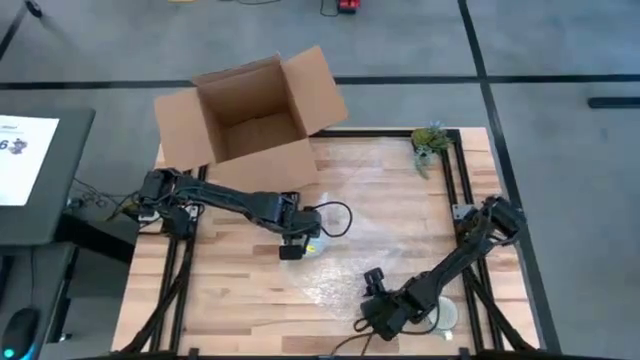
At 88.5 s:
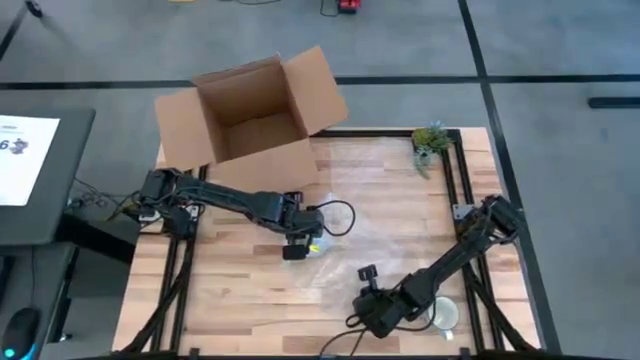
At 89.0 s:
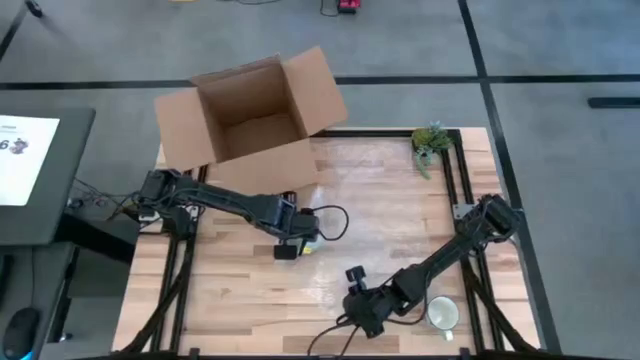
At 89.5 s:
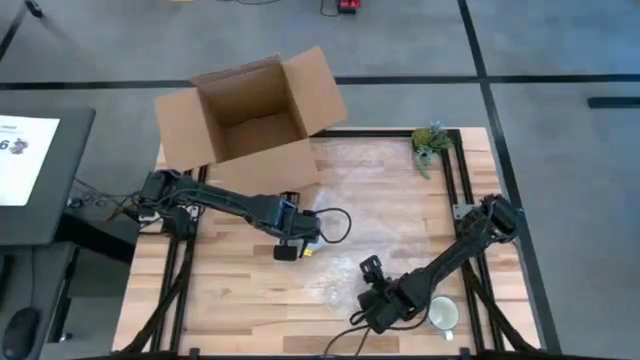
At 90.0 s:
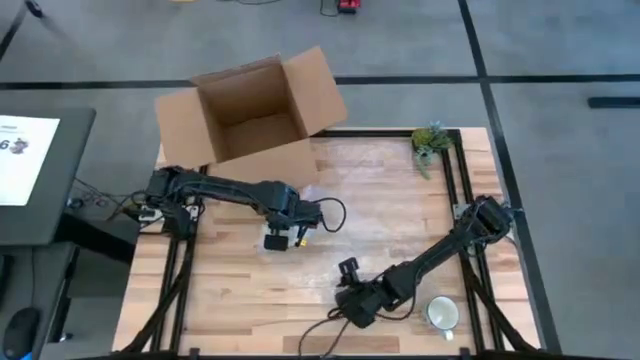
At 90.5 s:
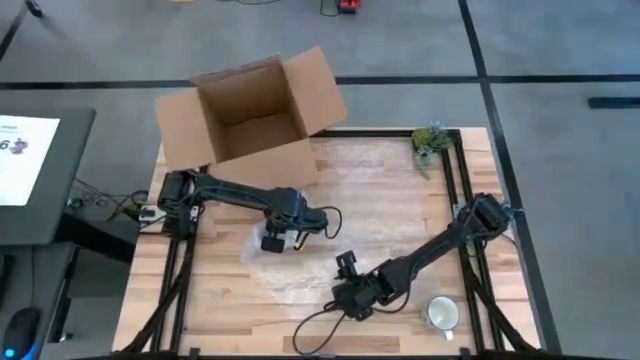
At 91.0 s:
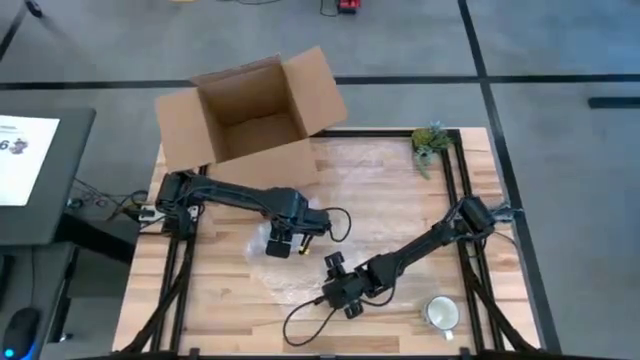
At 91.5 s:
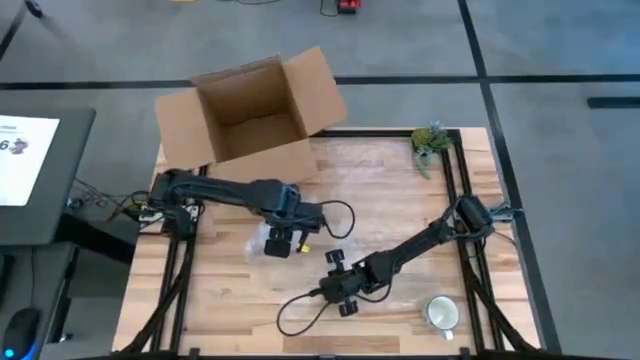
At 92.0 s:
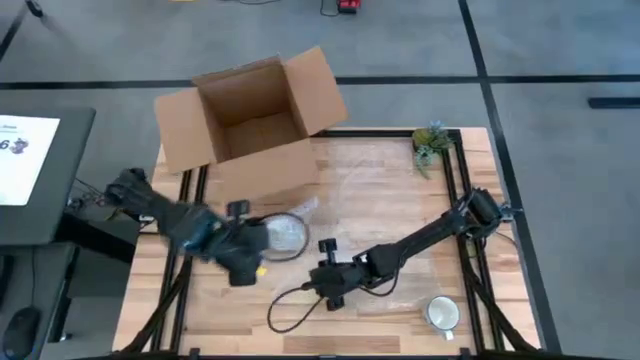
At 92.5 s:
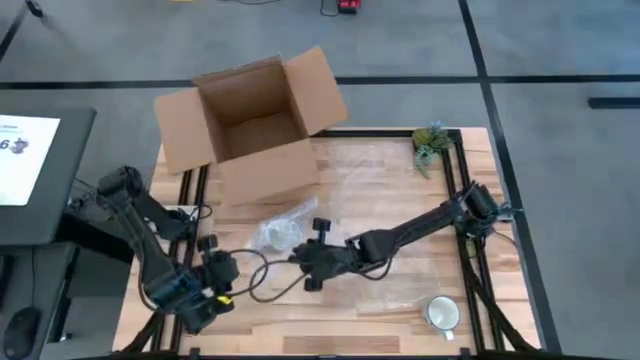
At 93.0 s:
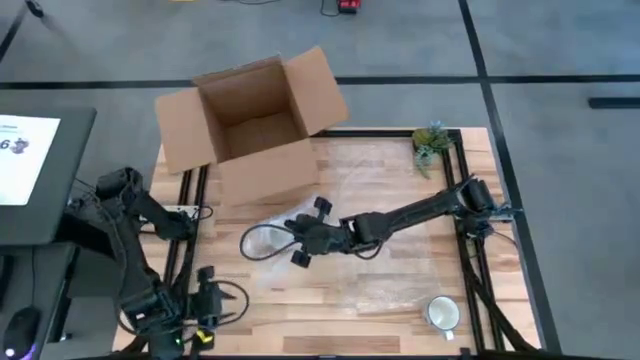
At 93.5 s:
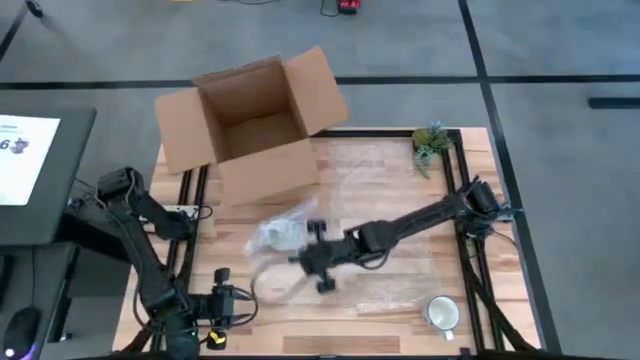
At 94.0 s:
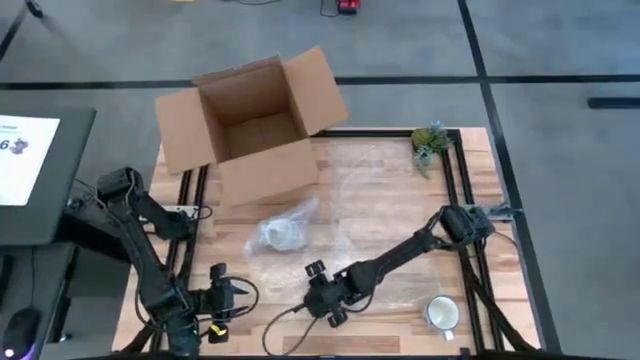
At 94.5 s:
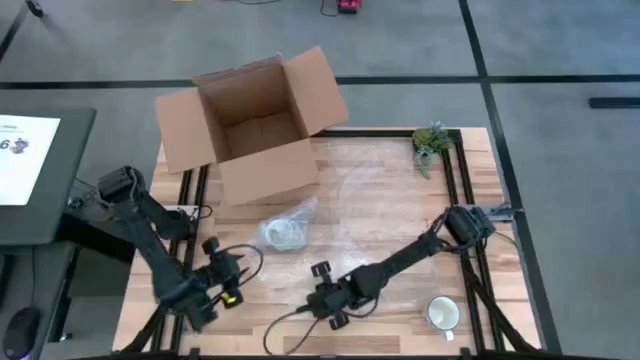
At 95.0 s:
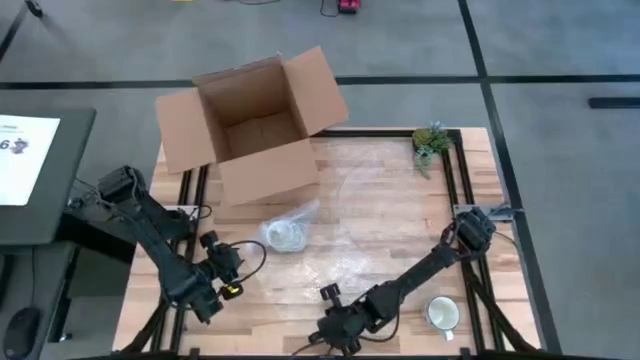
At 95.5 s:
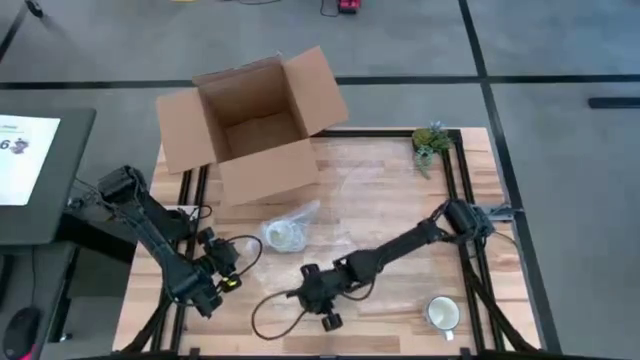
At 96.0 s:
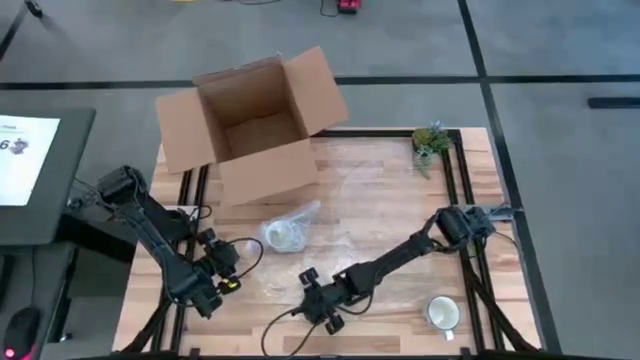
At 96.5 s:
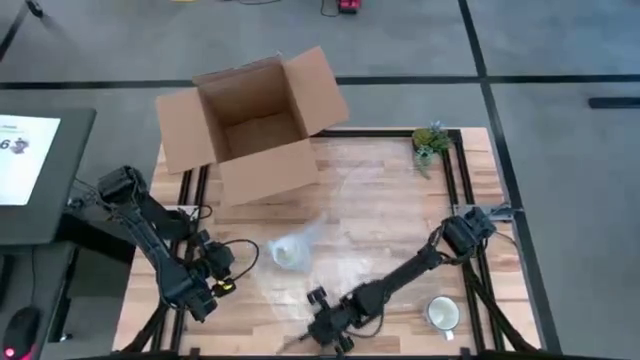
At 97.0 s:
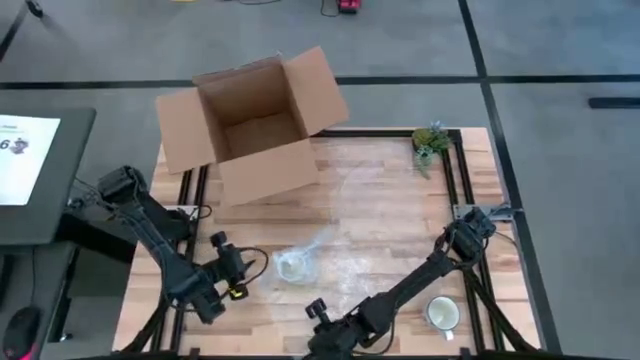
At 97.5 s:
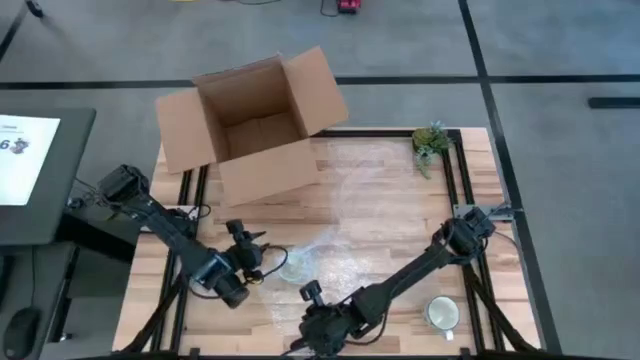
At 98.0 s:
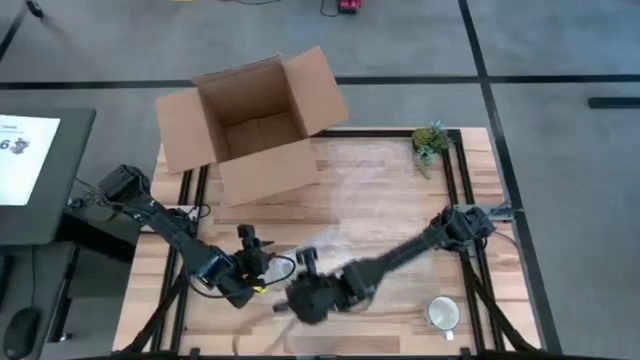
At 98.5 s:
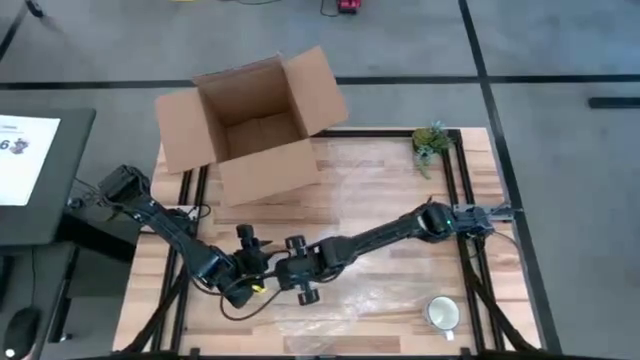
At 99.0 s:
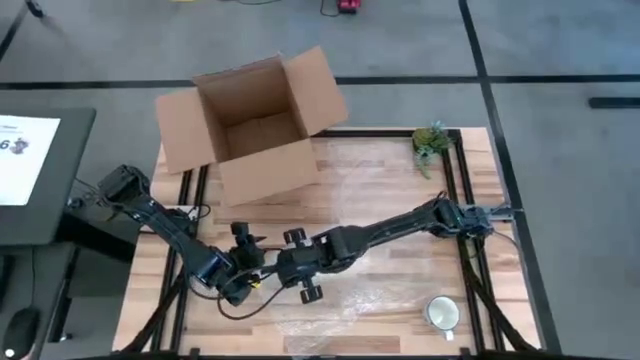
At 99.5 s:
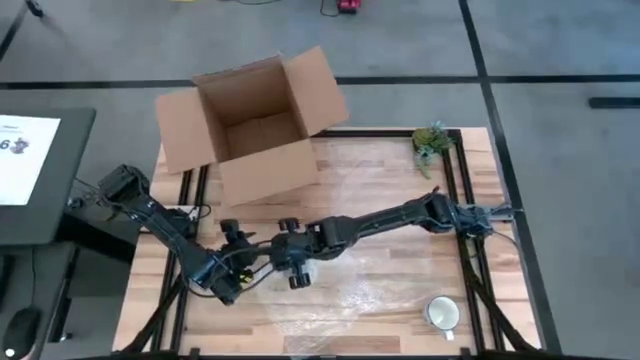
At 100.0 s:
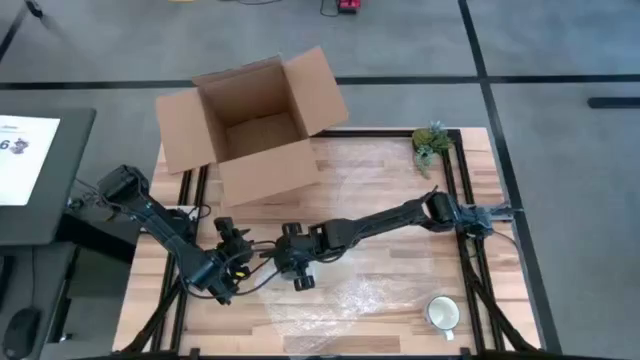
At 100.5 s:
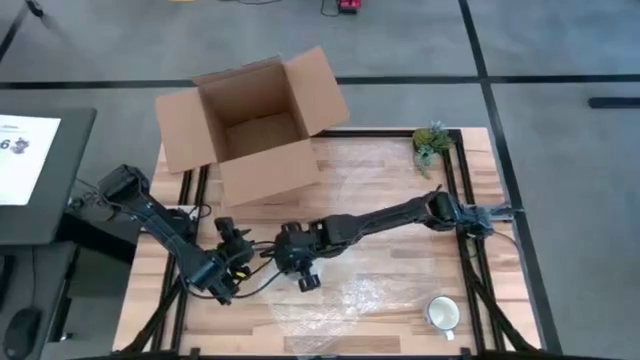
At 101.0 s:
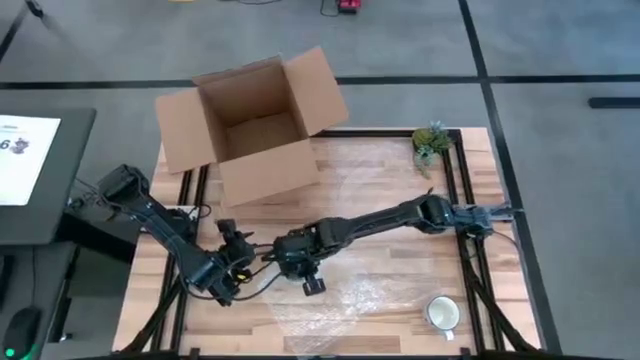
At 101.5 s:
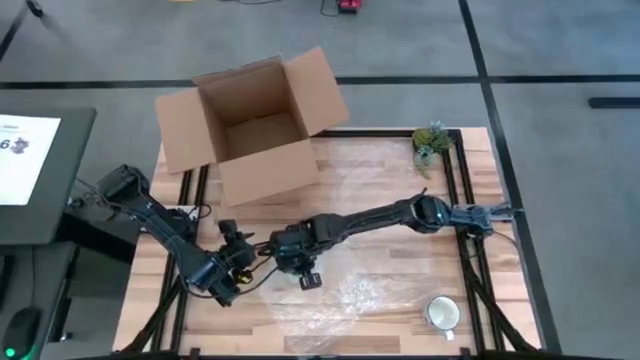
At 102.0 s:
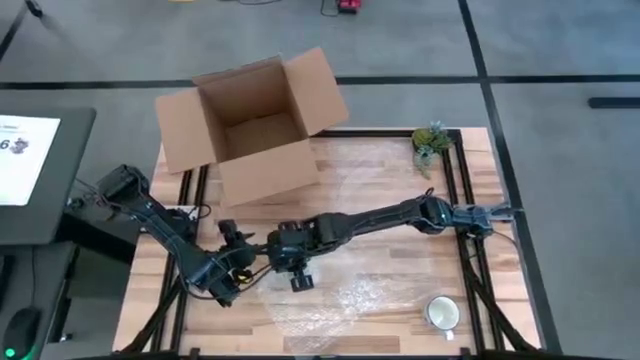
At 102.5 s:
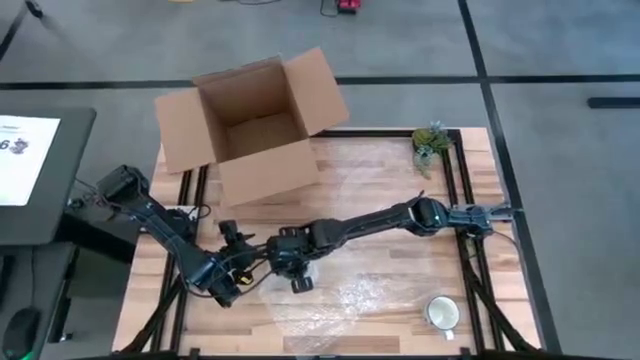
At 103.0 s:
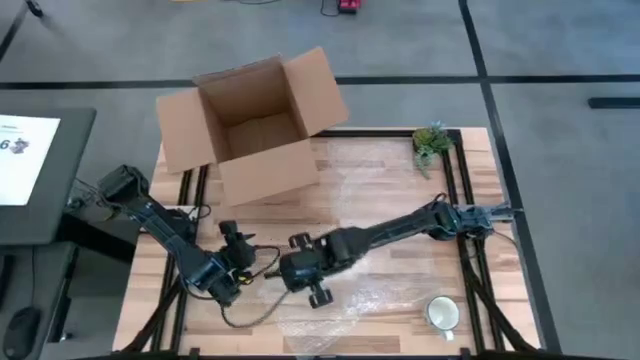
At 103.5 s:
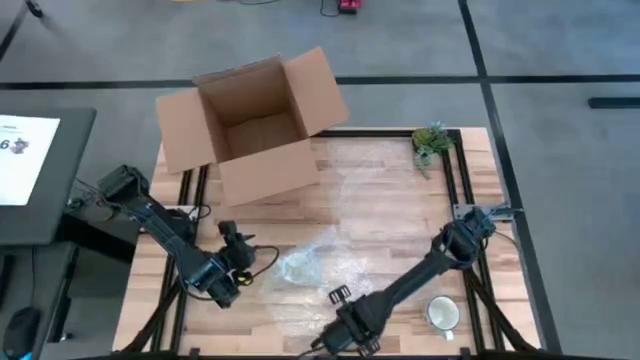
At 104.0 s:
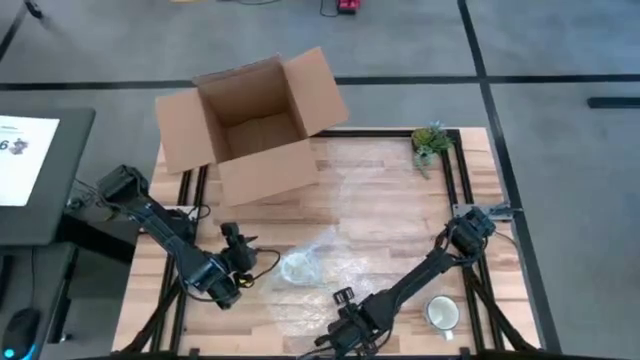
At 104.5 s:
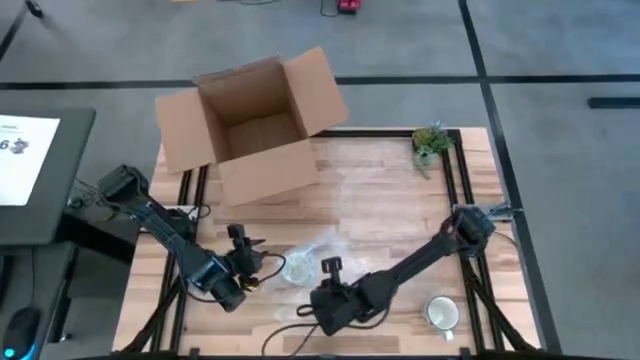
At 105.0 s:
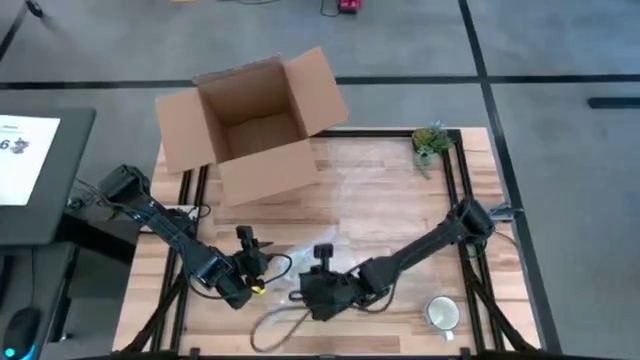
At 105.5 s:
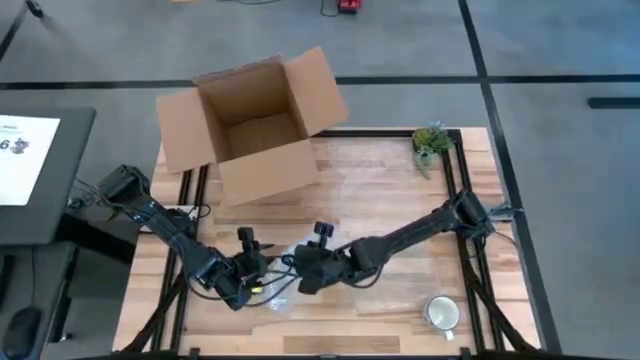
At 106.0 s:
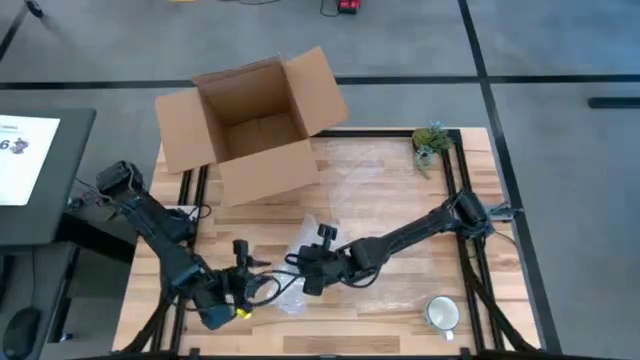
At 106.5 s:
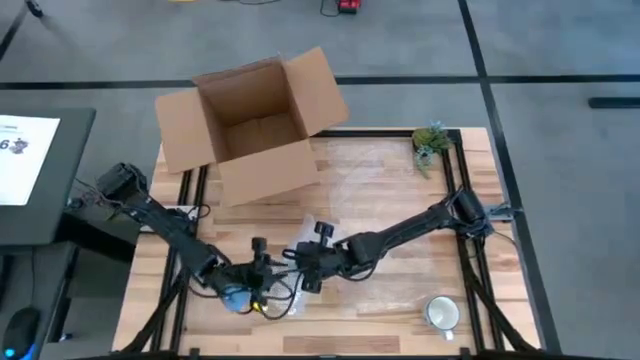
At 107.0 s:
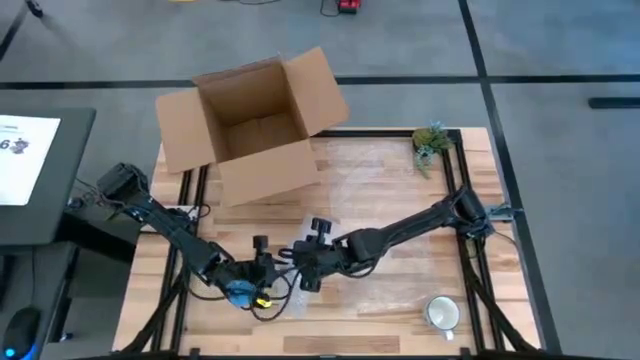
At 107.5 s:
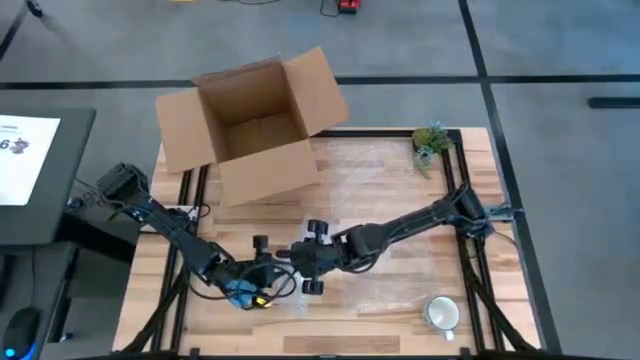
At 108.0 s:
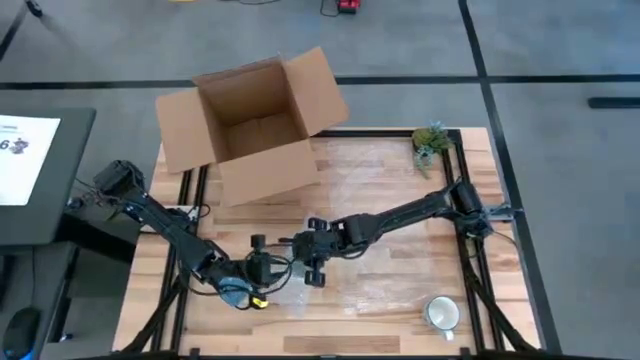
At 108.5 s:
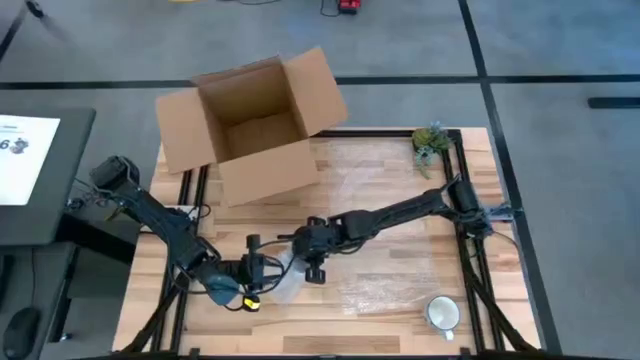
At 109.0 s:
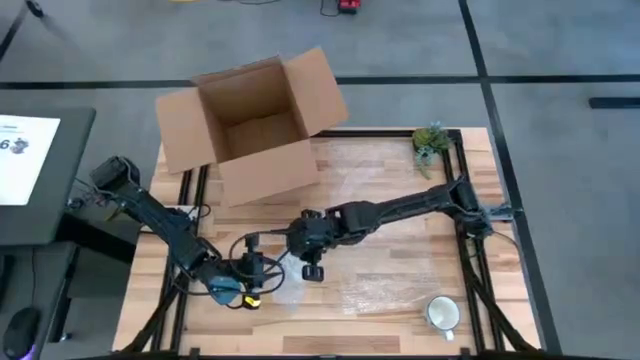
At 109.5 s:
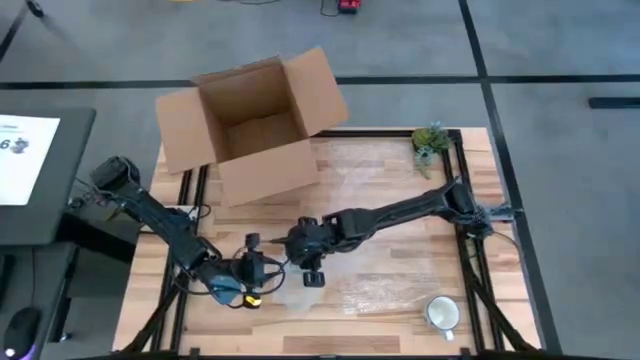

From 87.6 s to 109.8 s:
Task: wrap mug
Wrap the green patterned mug with the bubble wrap

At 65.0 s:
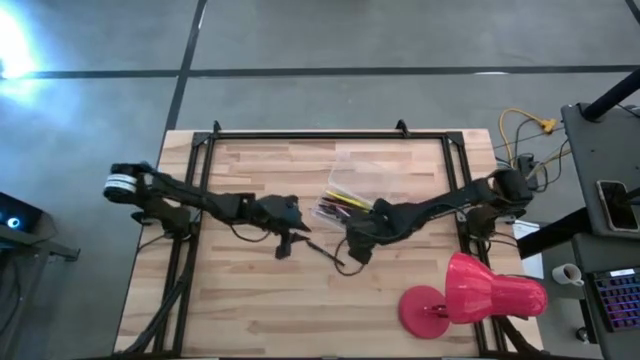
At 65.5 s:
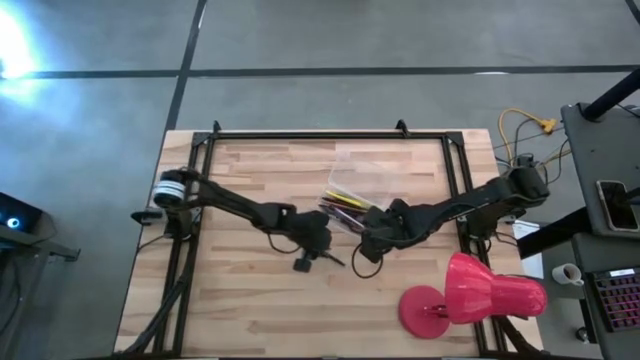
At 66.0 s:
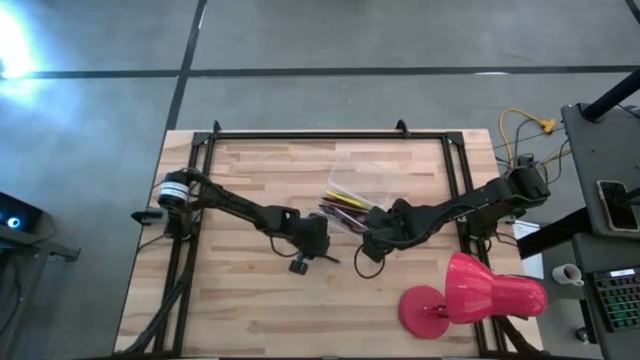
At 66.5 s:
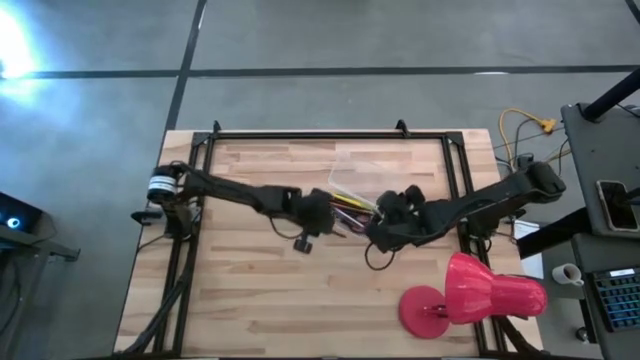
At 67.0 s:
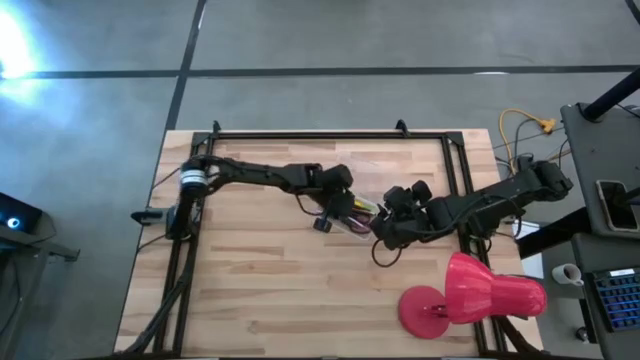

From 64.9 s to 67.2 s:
Task: Pick & place school supplies into a supply box
Put the black pen into the transparent supply box
